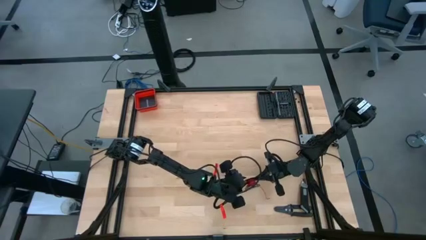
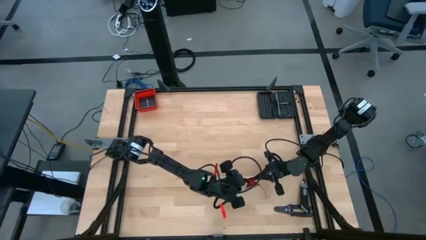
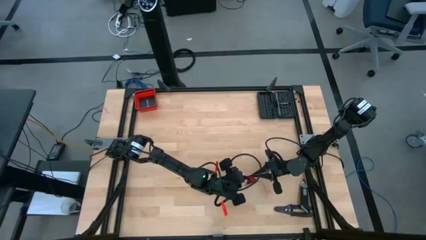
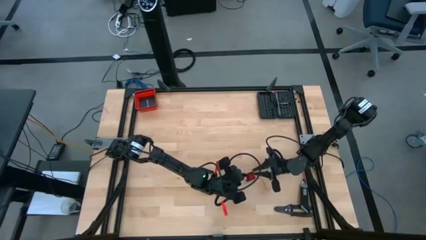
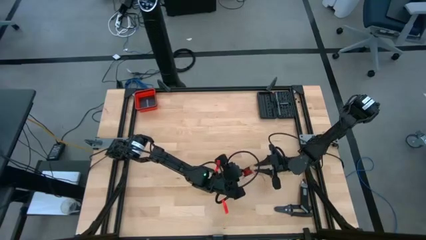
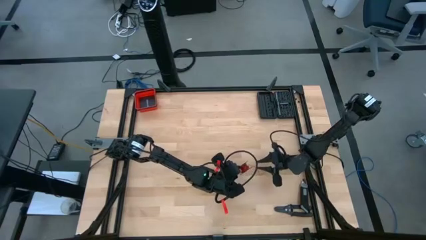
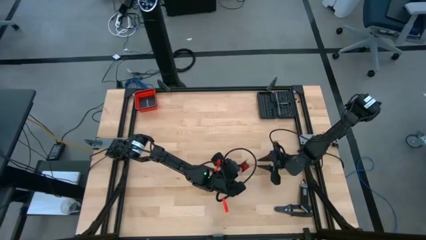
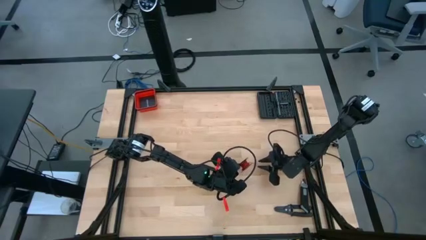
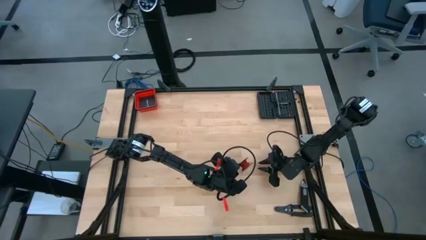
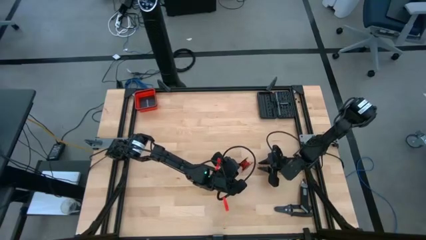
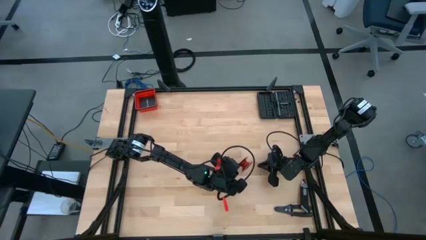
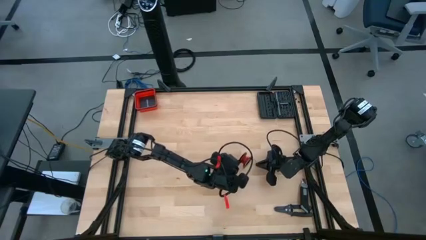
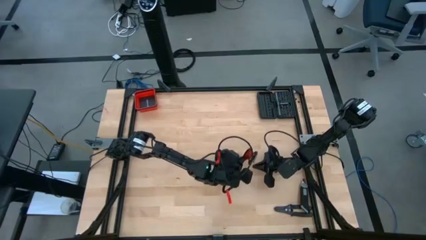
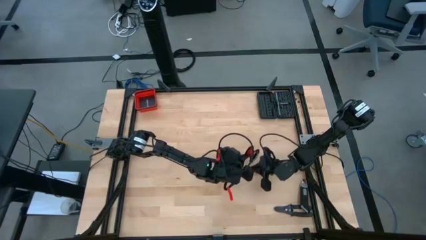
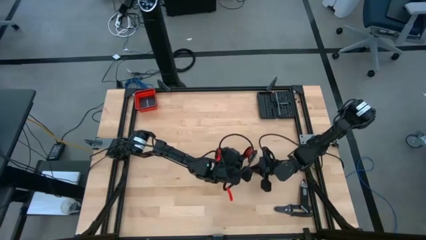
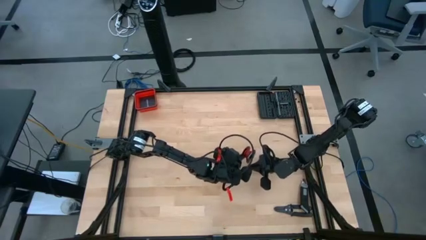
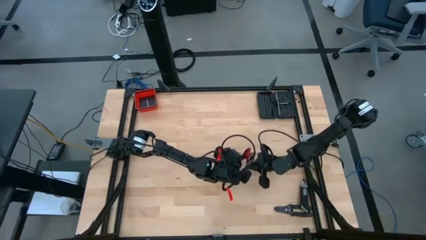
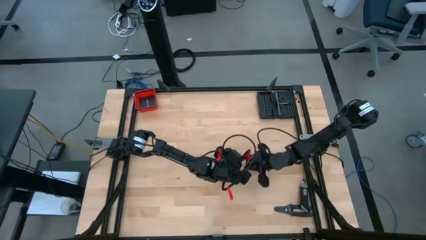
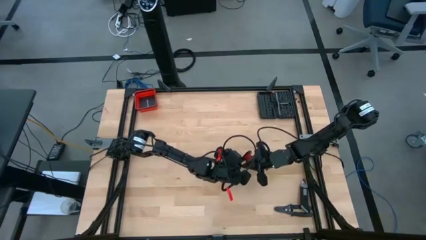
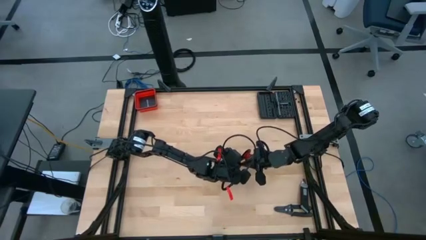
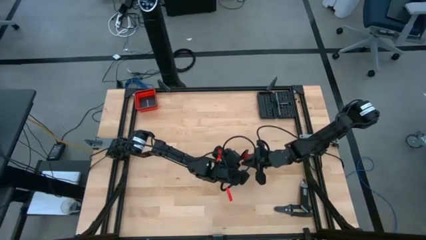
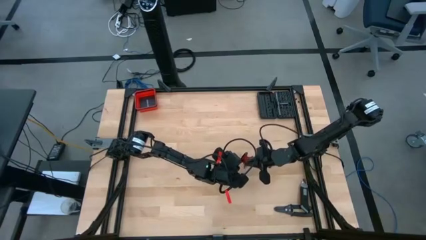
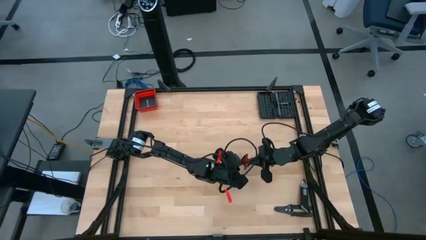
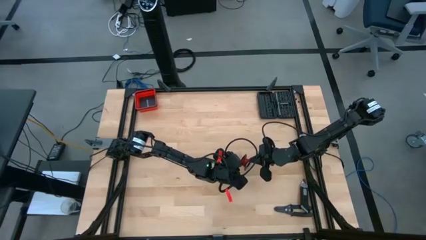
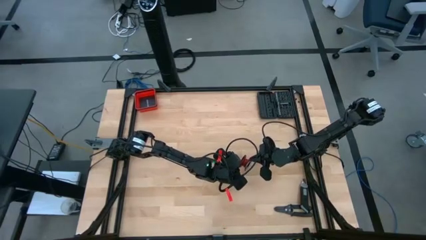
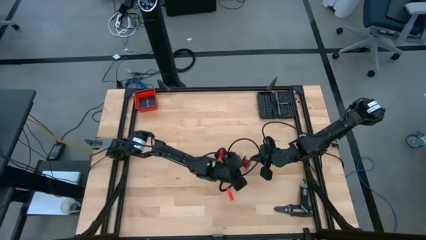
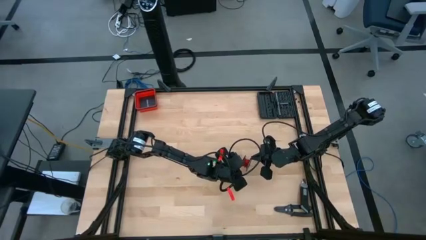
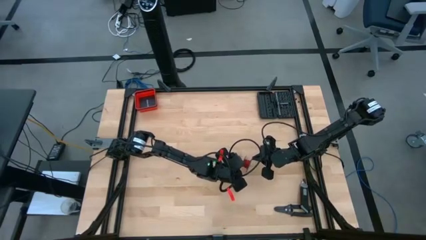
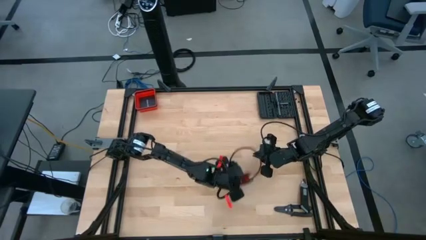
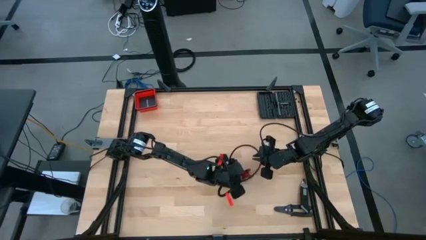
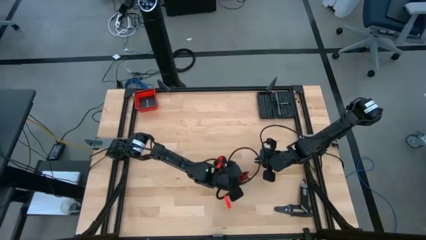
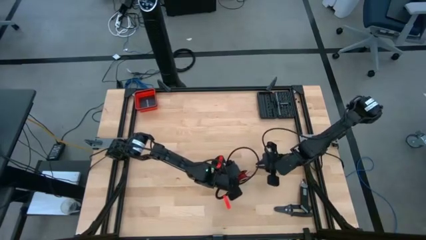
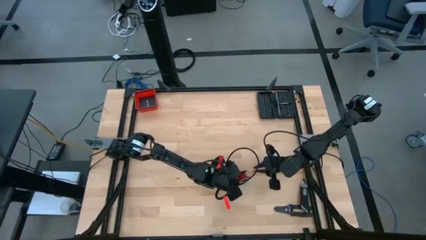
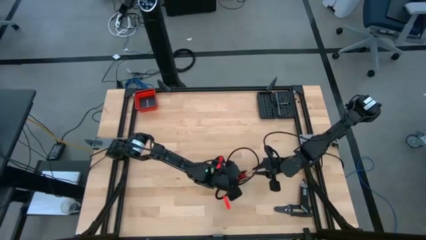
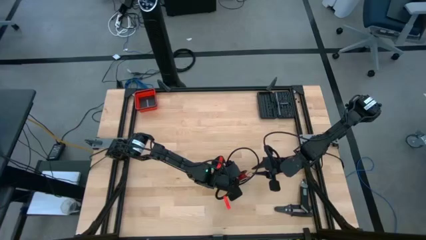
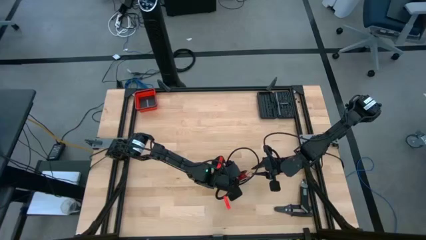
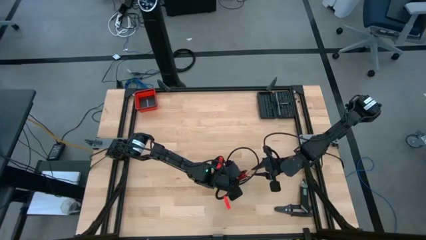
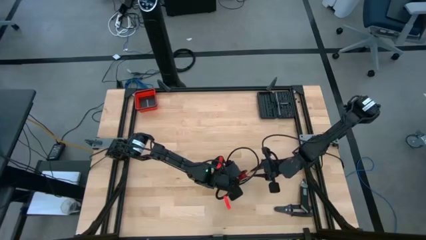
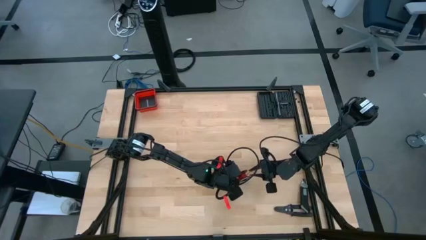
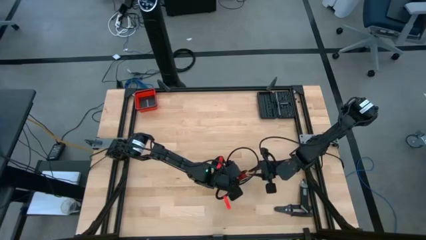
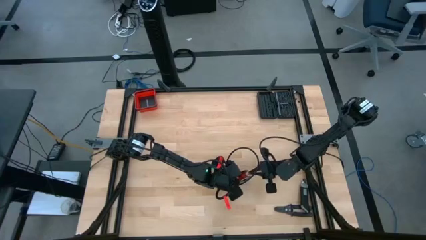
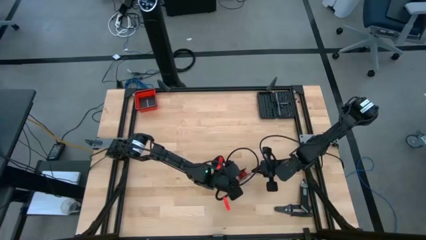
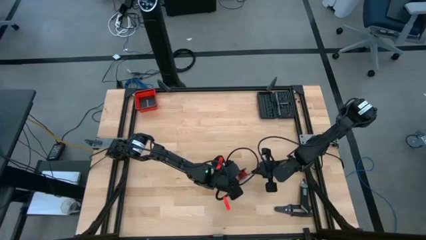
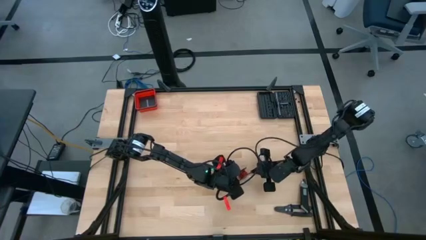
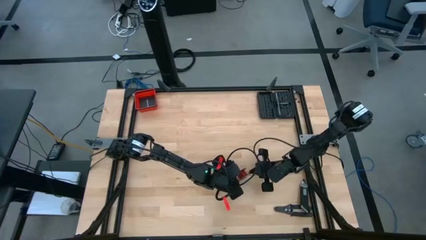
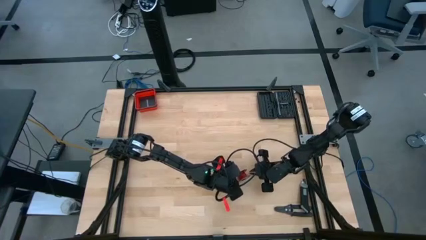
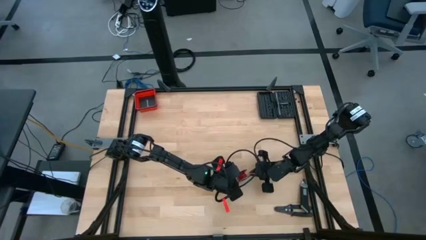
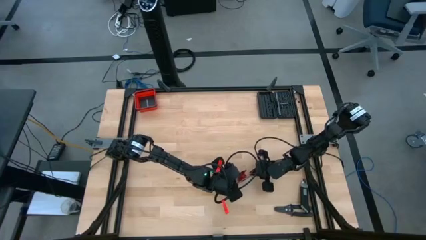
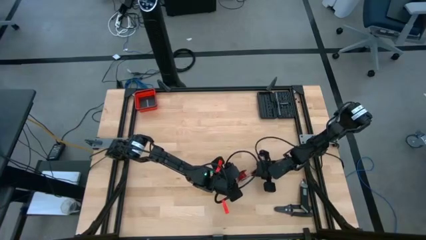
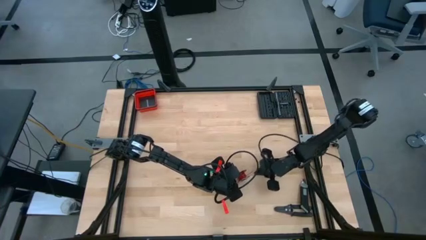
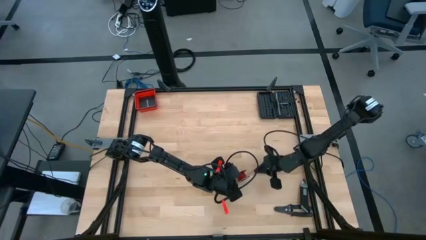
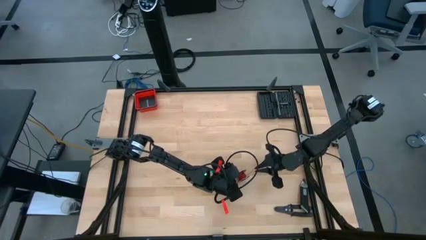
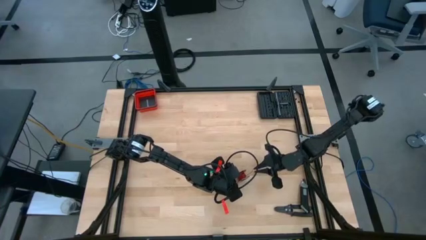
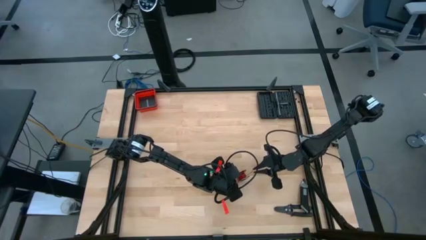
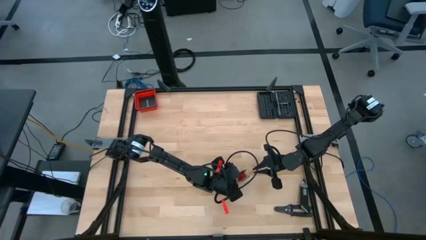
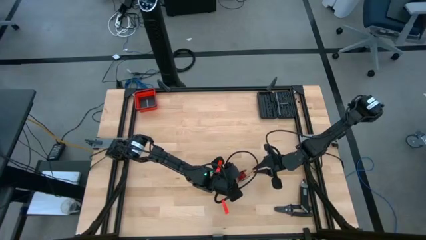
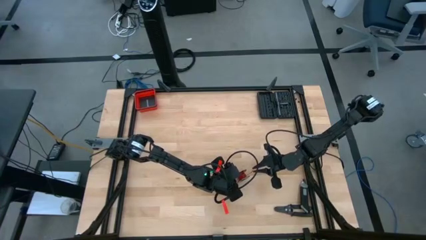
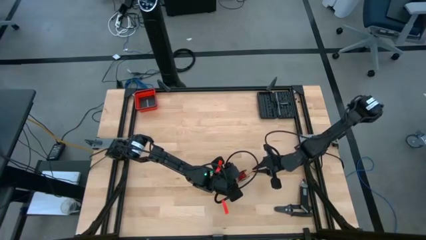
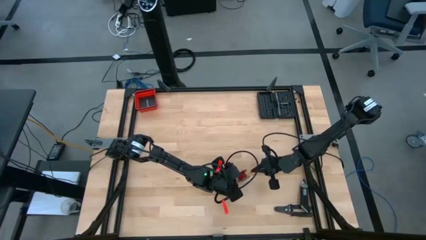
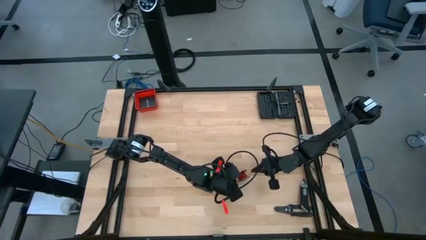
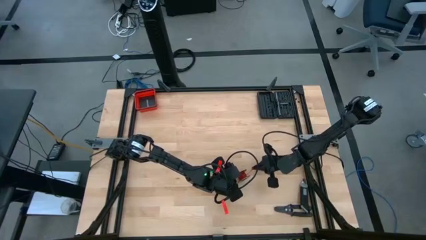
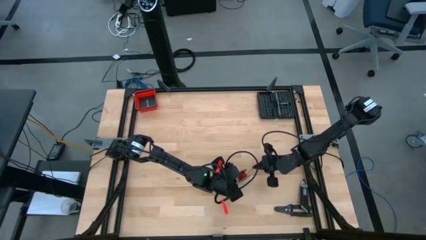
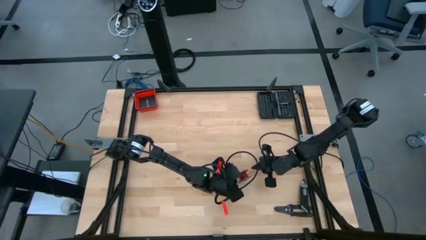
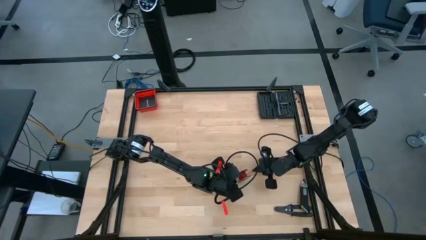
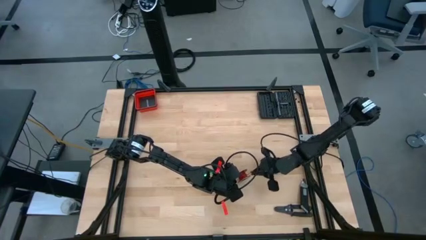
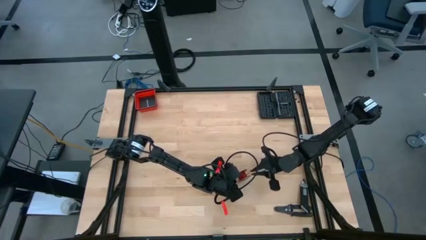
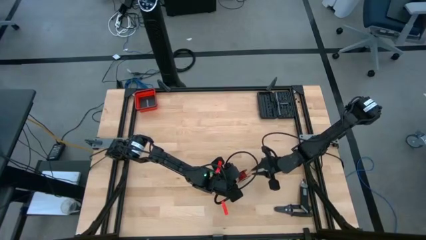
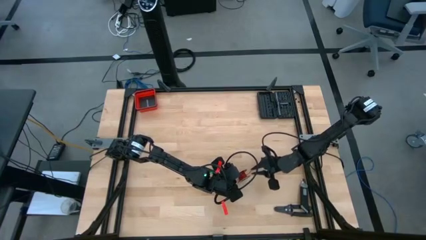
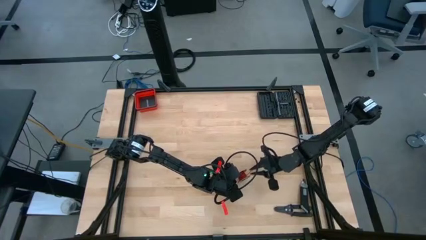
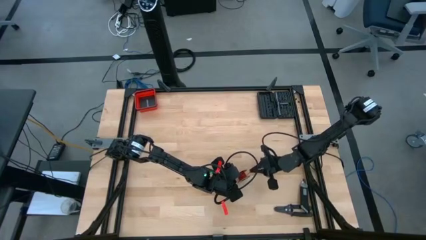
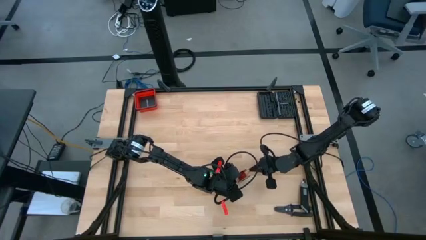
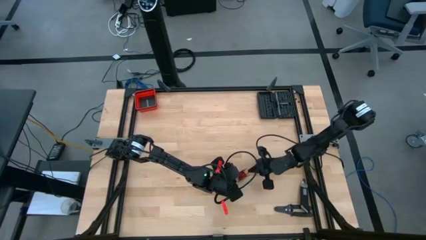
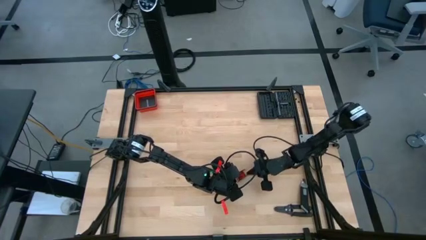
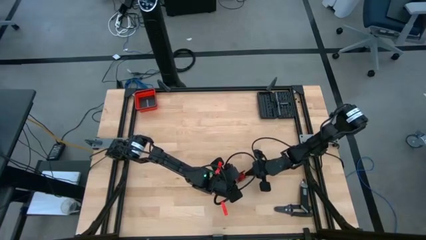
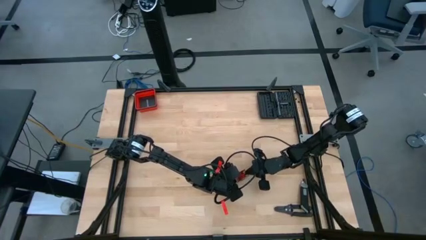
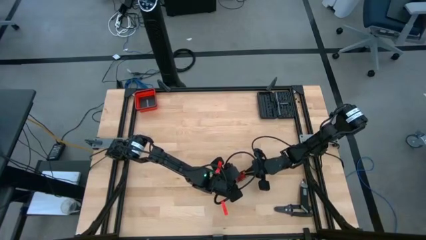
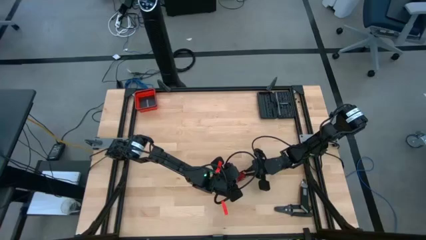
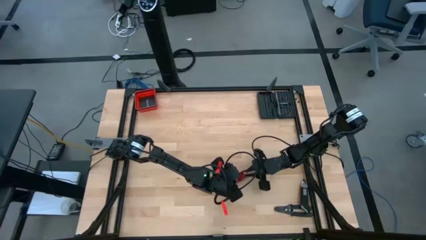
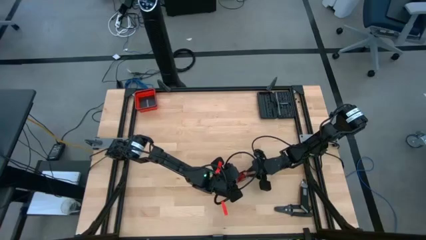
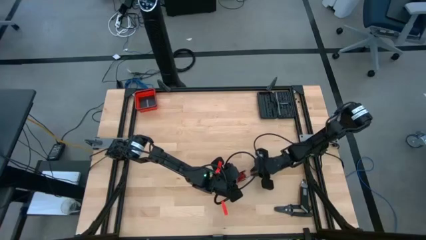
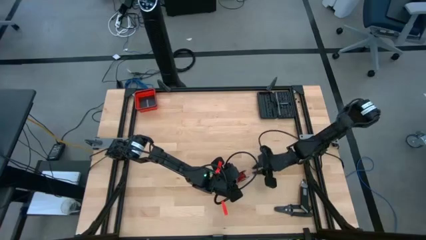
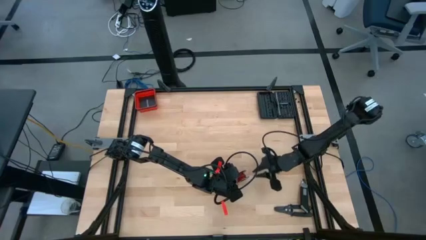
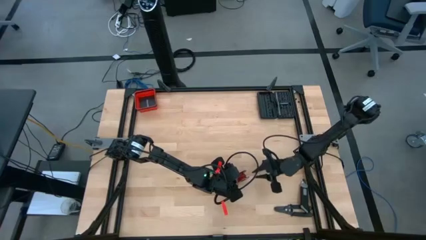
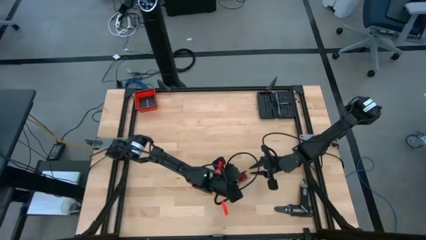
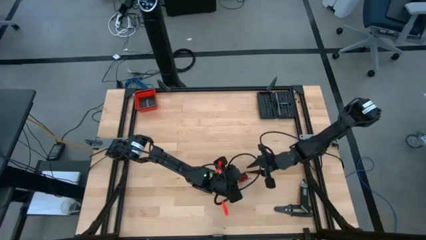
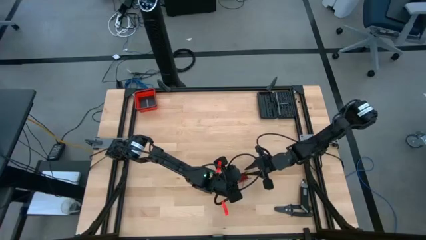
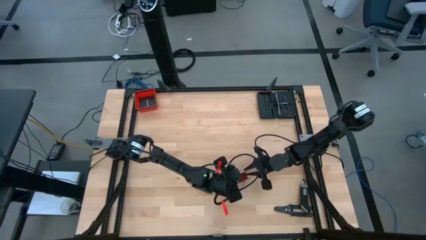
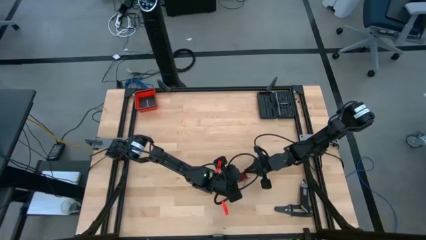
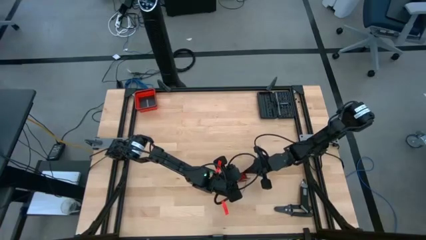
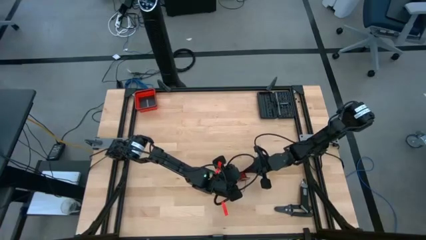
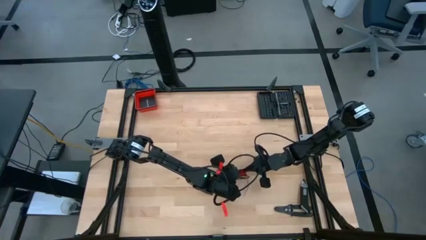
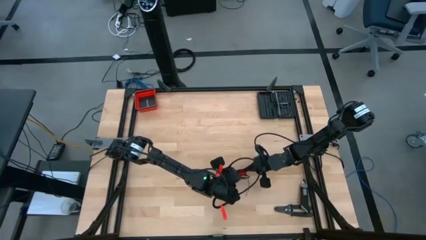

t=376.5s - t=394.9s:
Task: Coil cords
Coil the red wire onto the spool
